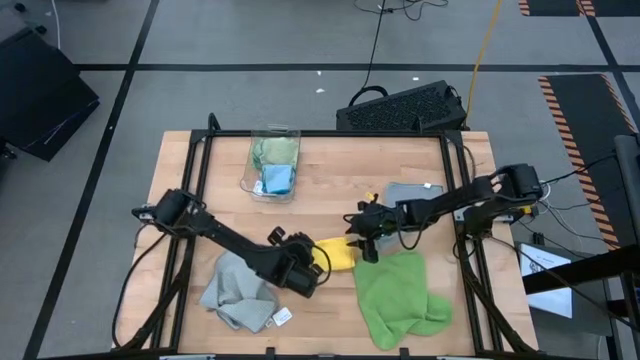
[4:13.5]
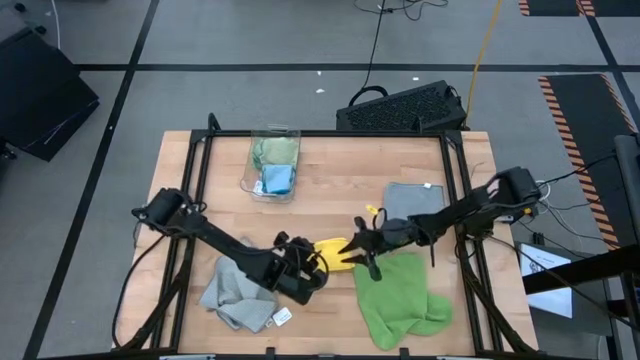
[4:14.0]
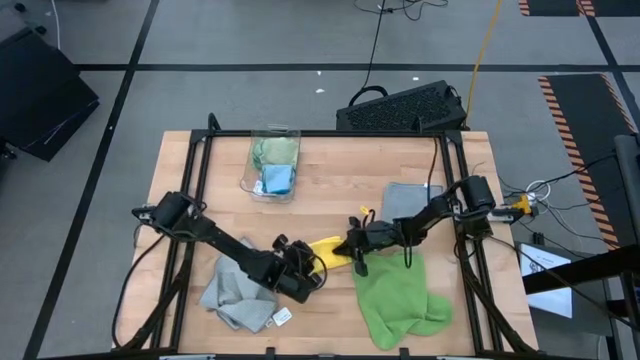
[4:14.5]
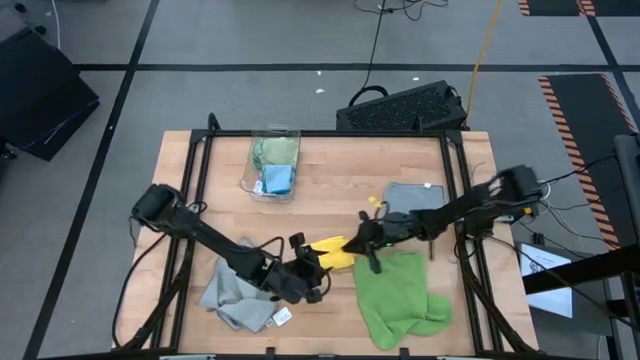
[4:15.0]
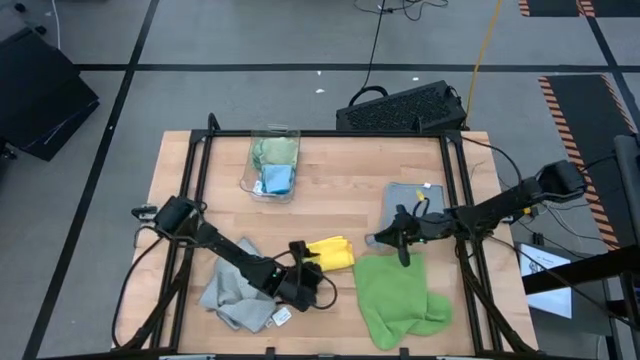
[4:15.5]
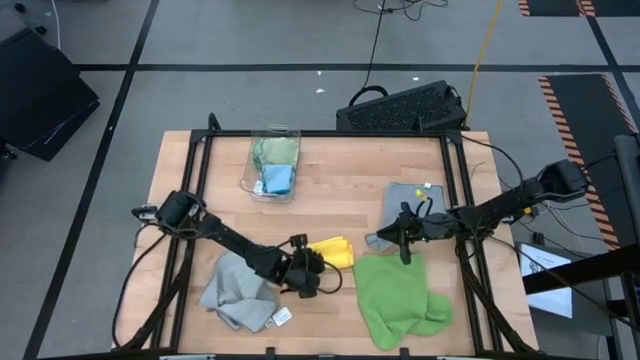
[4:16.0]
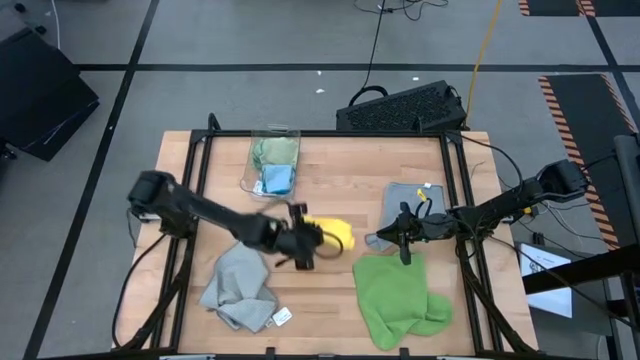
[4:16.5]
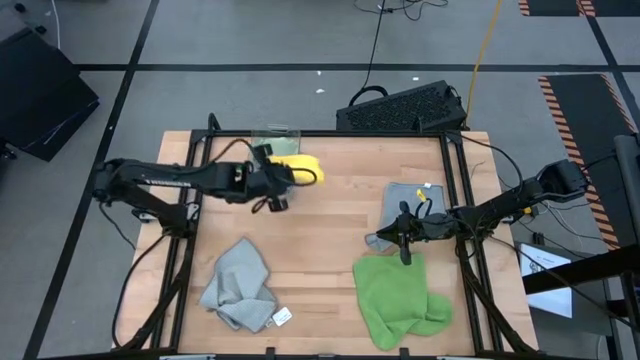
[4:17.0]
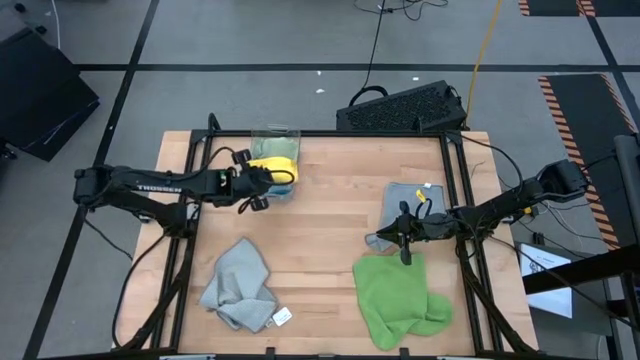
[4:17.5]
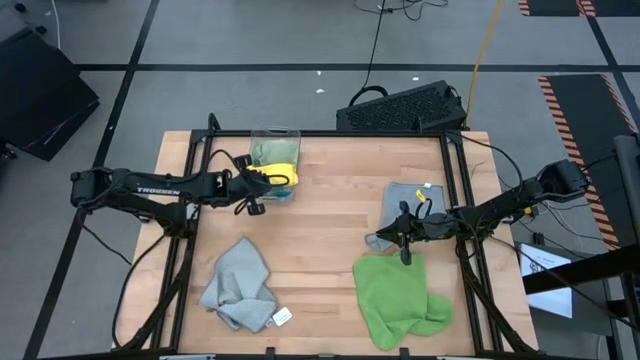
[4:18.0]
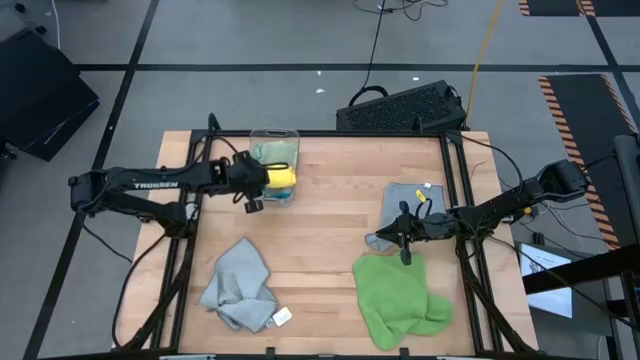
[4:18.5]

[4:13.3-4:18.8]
Task: Fold microfiber towels
Put the yellow microfiber cloth into the transparent bin

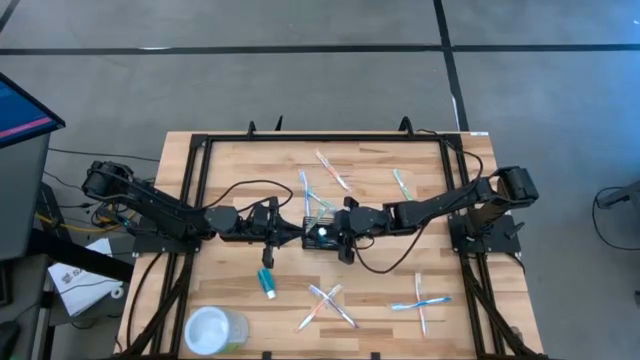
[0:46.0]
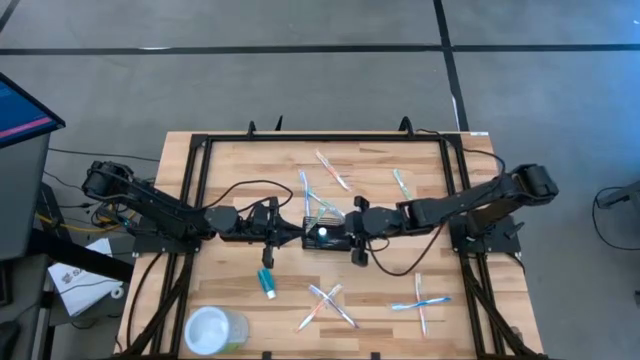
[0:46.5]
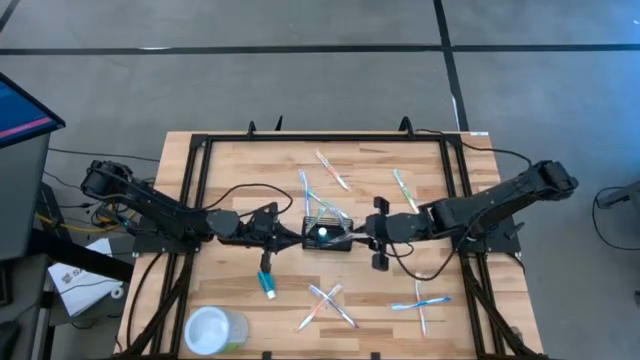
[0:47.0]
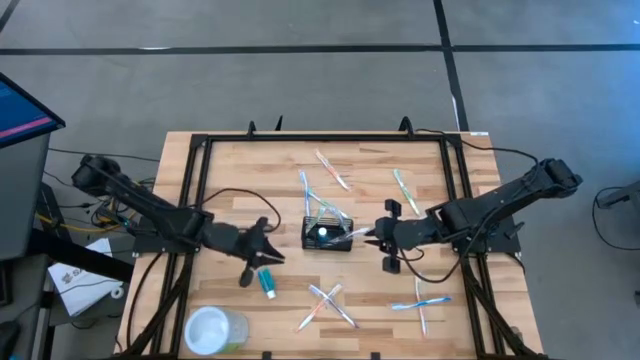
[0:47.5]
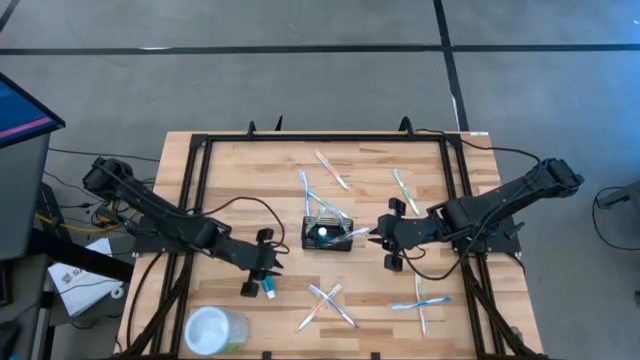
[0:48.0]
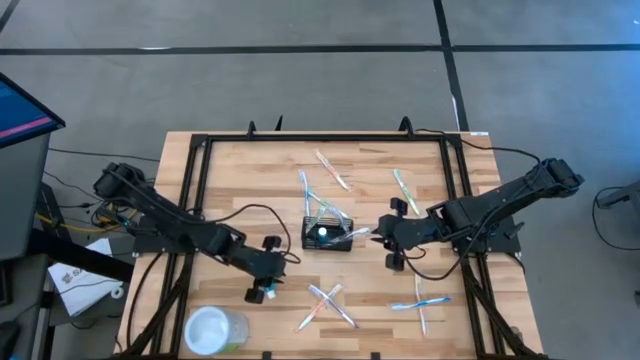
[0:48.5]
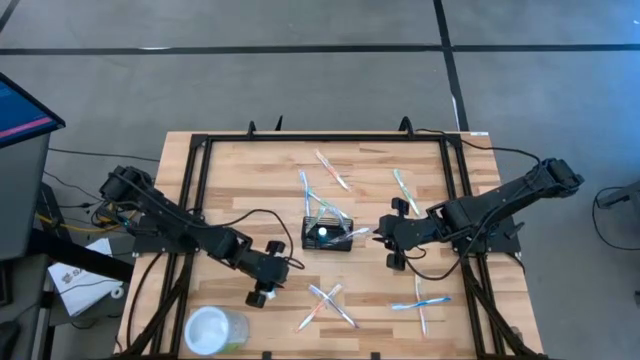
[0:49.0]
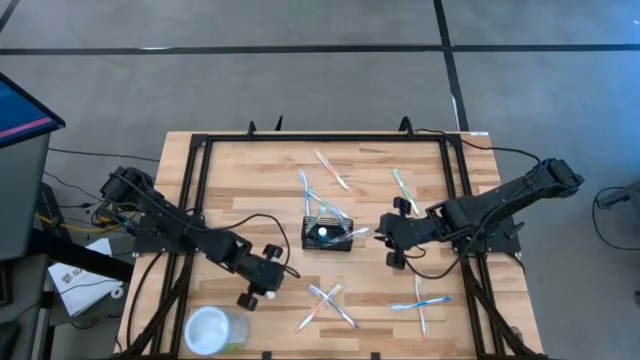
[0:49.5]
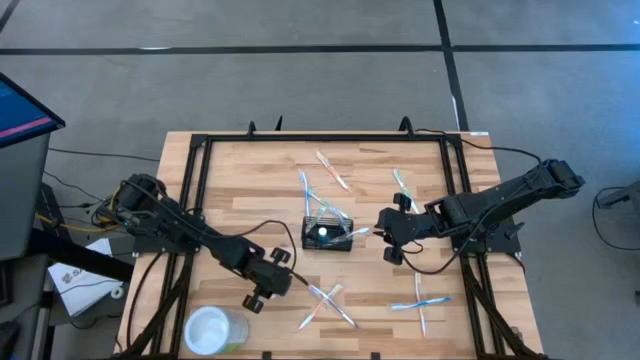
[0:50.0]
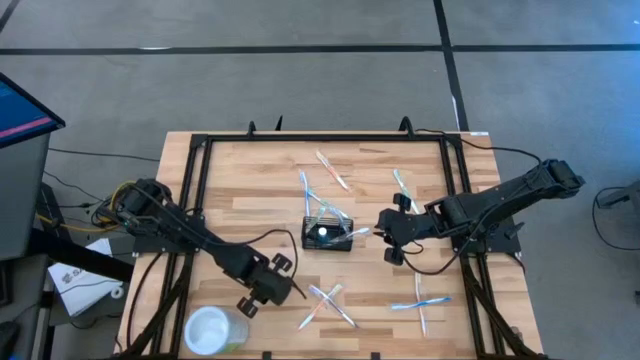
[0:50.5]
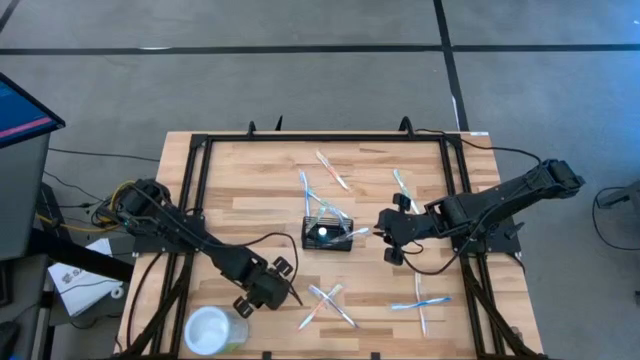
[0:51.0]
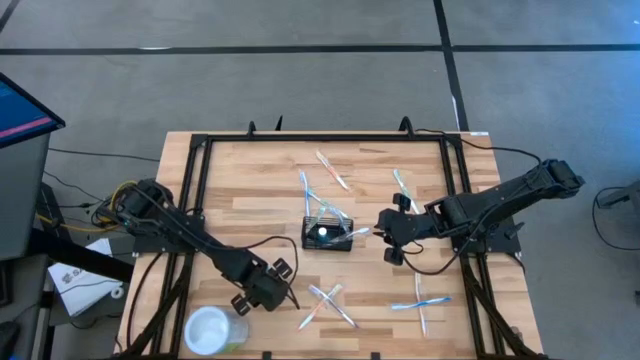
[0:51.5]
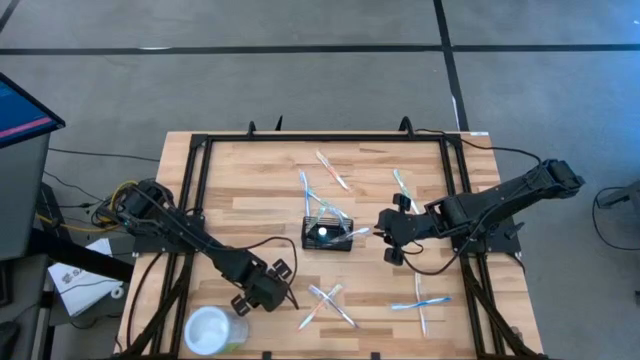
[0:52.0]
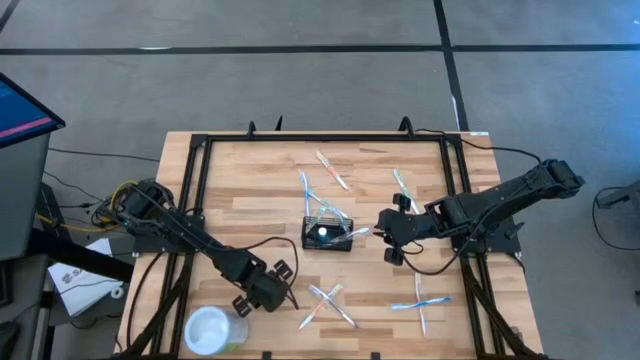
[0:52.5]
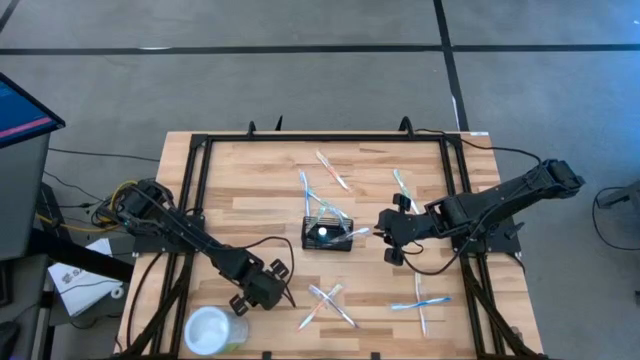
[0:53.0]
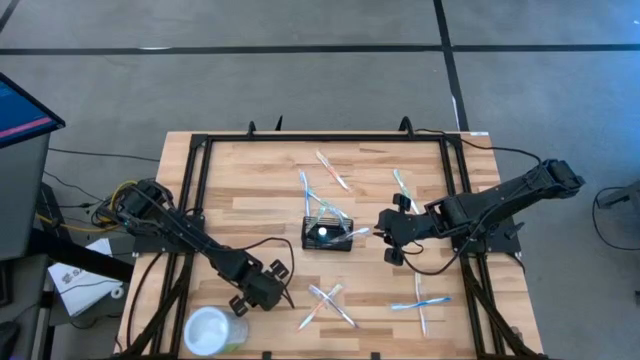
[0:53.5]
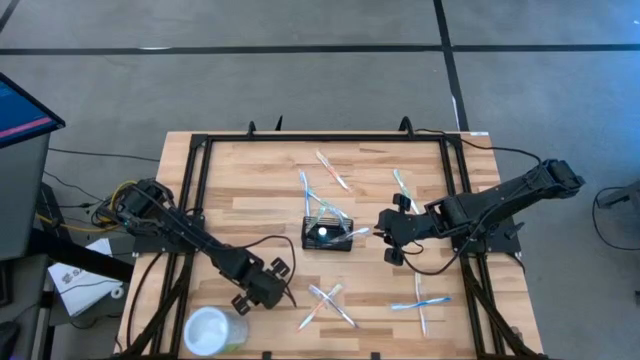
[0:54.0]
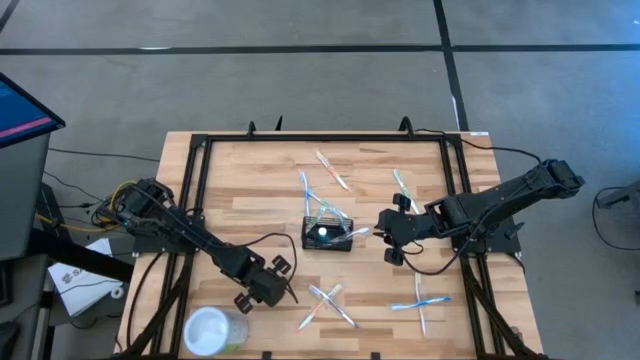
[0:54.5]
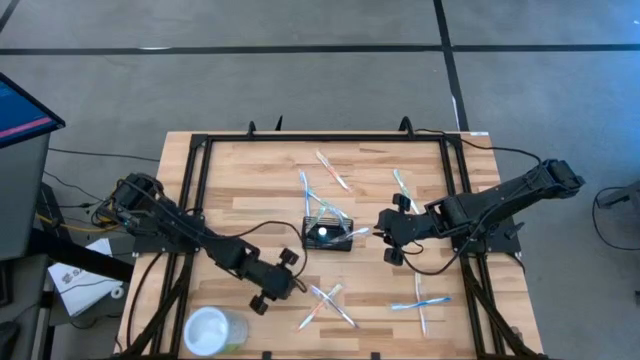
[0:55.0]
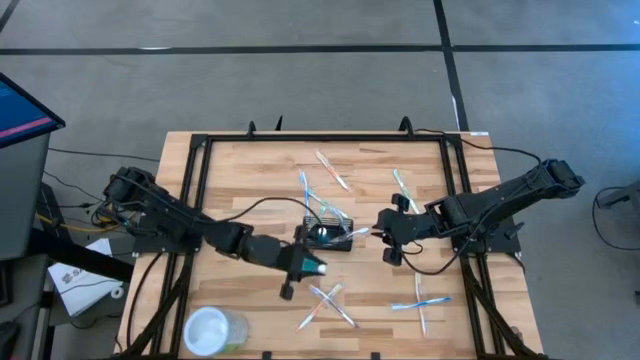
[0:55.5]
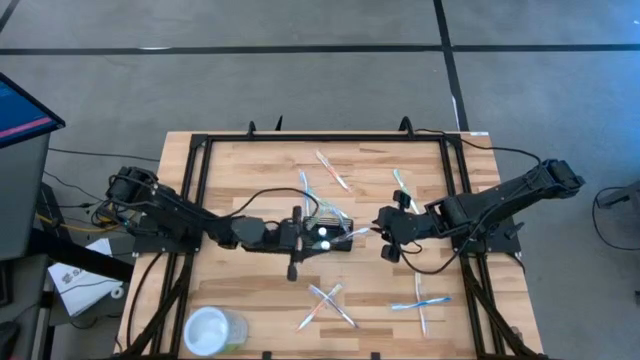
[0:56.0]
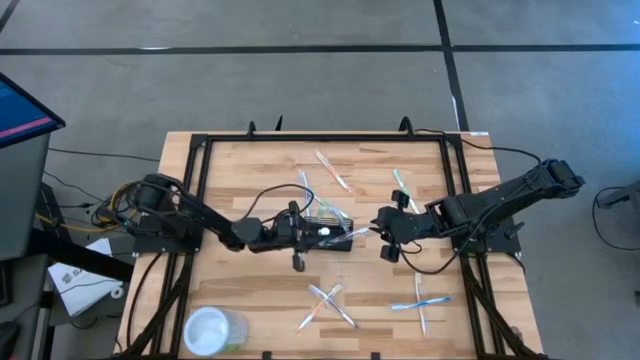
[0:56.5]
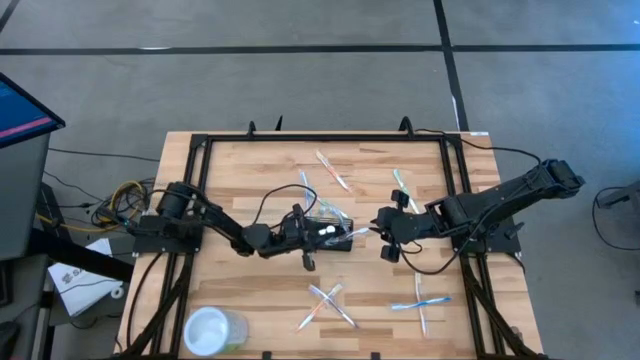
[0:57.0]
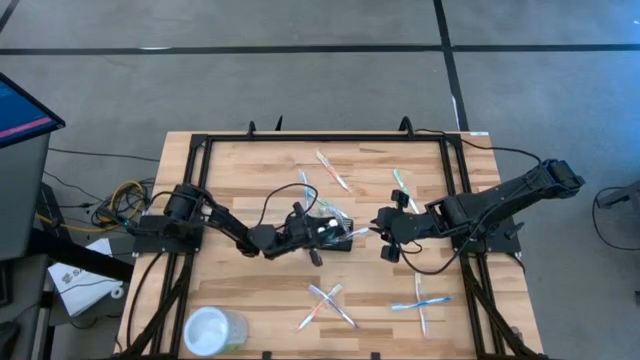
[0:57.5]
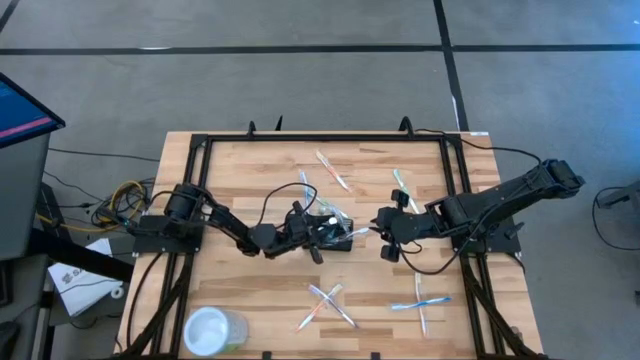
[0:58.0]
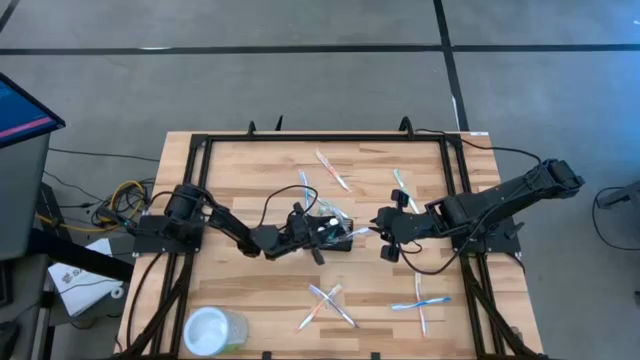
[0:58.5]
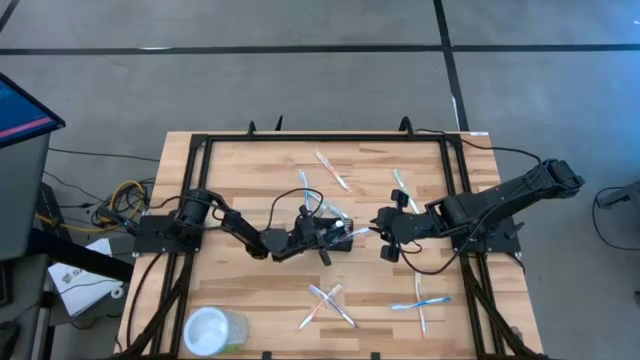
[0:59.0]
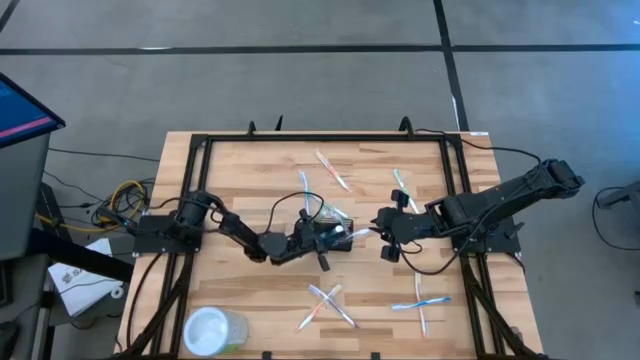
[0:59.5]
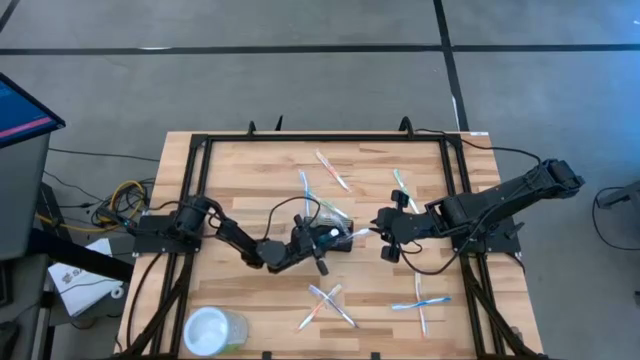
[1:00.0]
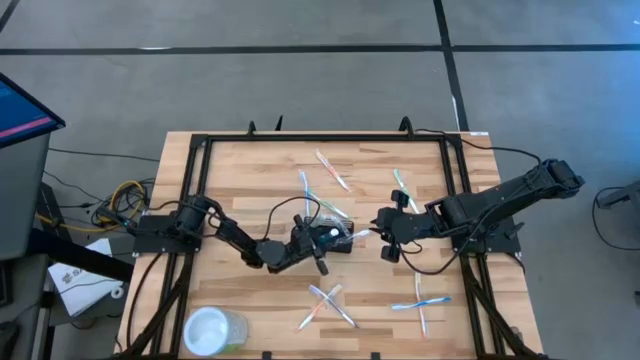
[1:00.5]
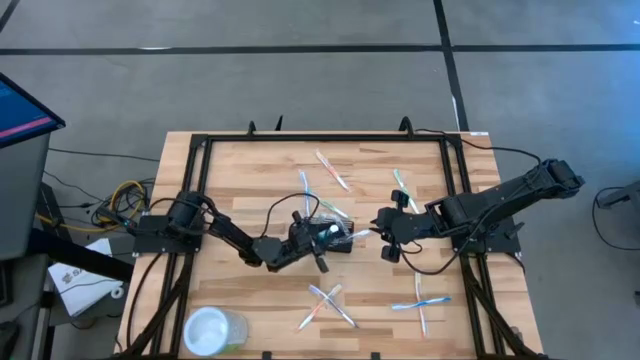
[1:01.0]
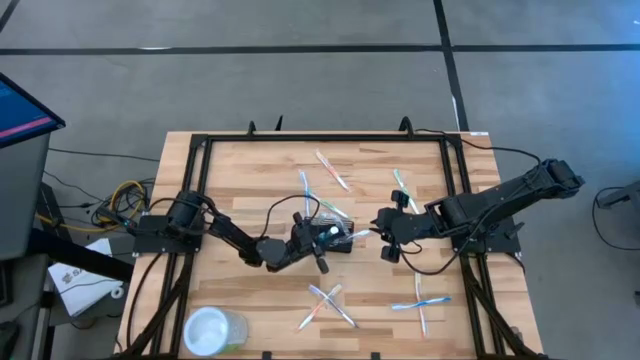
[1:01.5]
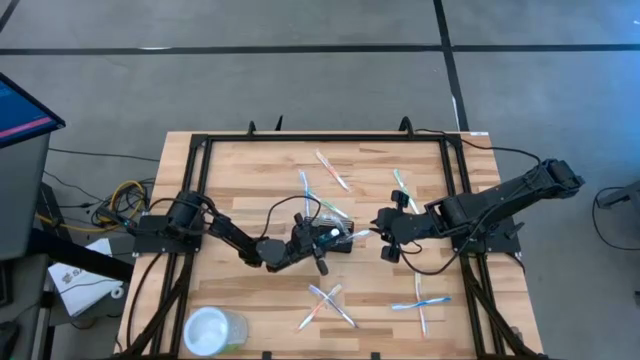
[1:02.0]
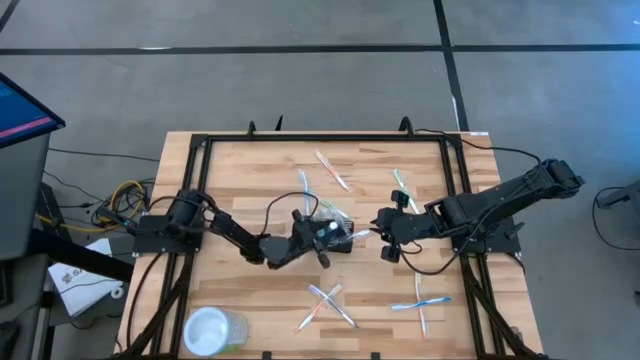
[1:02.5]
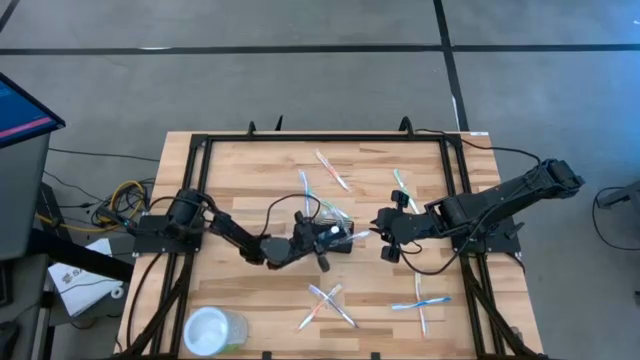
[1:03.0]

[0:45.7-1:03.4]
Task: Pick & Place toothbrushing station
Put the mouthwash into the wire organizer
